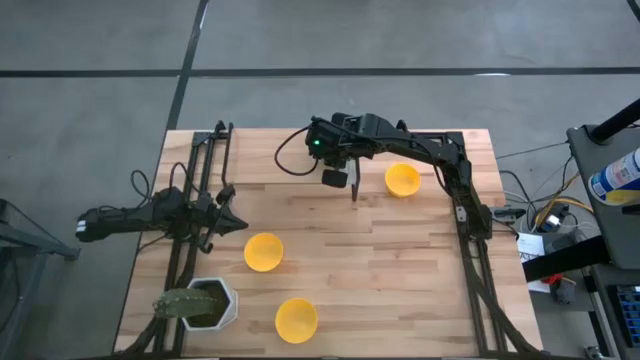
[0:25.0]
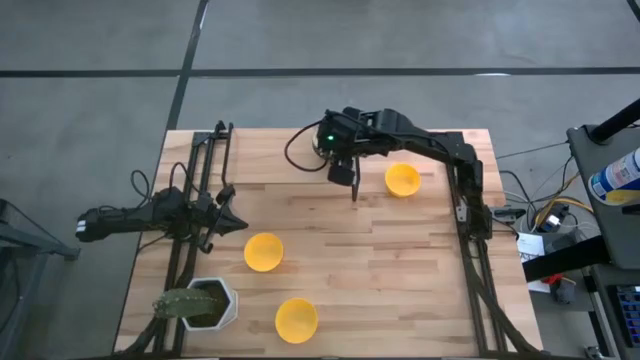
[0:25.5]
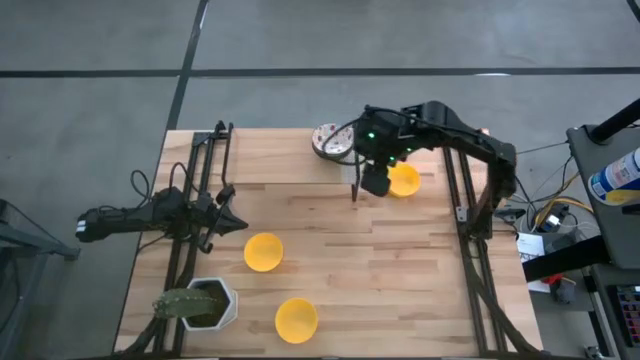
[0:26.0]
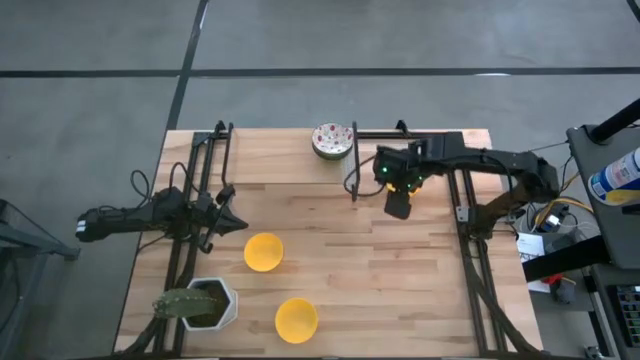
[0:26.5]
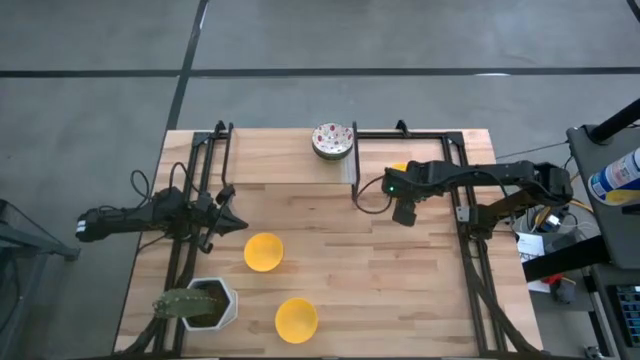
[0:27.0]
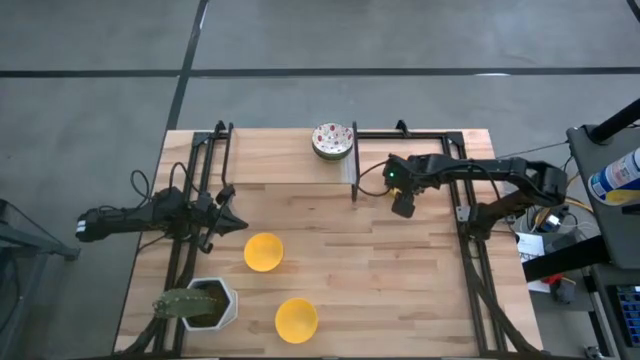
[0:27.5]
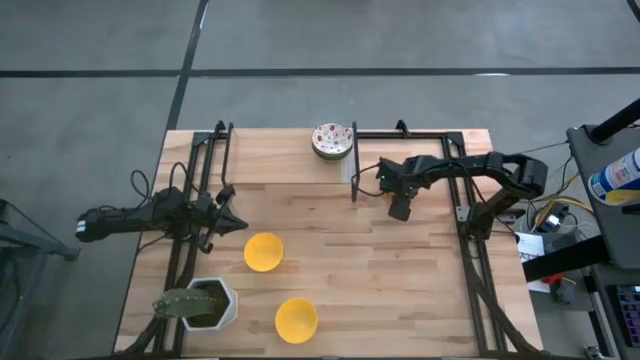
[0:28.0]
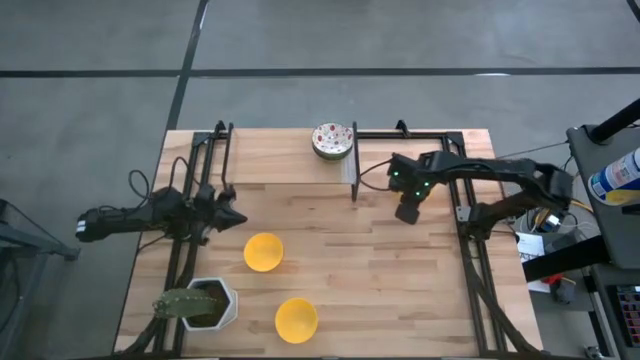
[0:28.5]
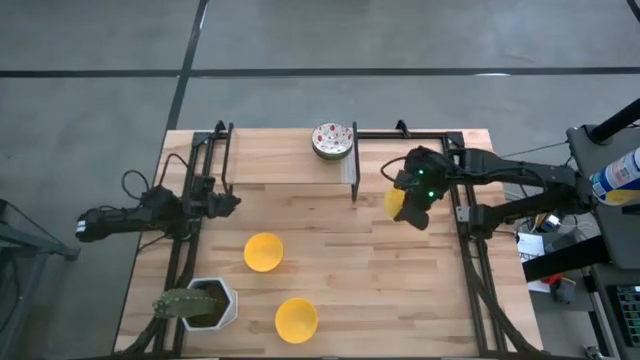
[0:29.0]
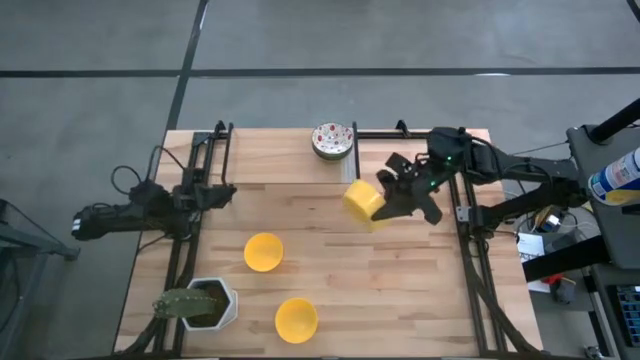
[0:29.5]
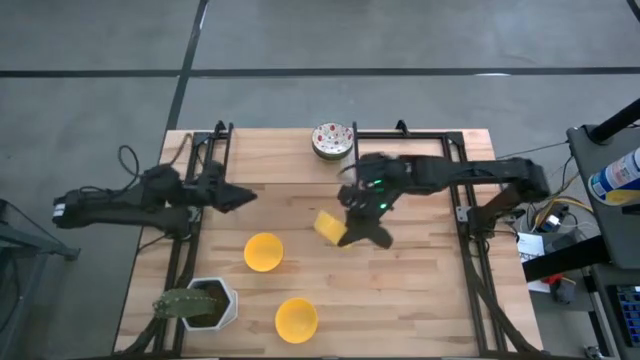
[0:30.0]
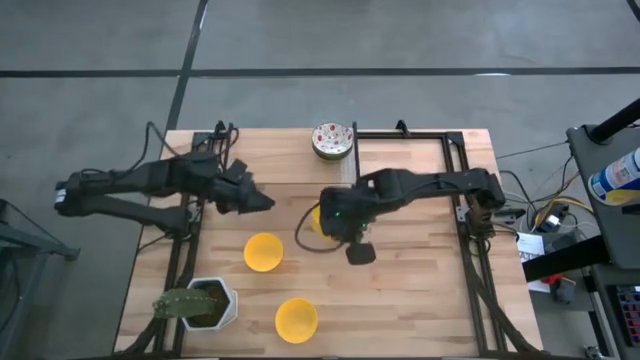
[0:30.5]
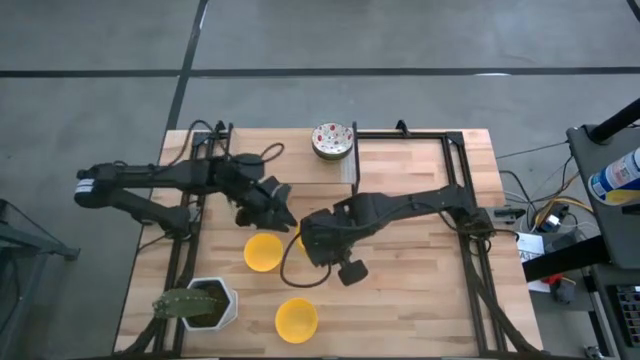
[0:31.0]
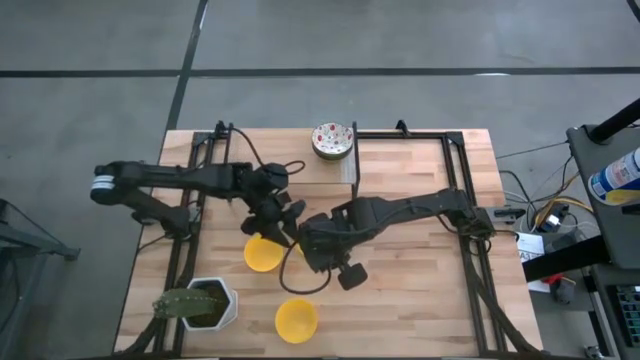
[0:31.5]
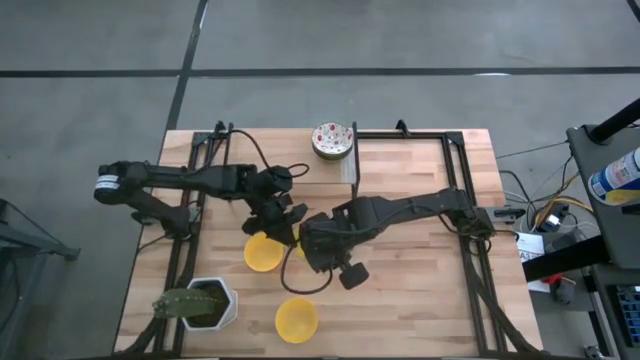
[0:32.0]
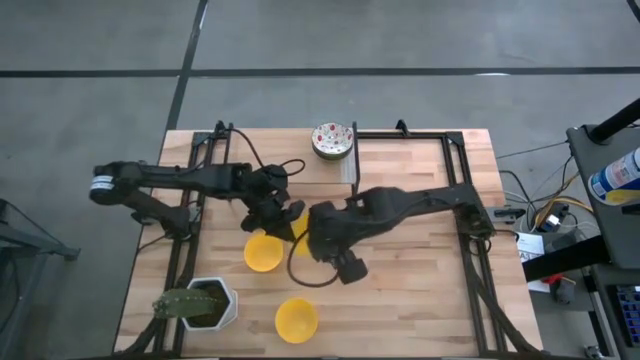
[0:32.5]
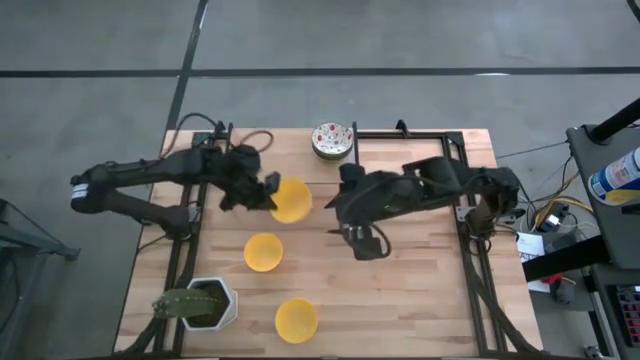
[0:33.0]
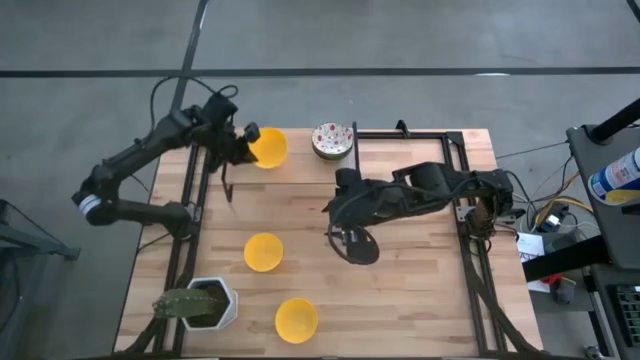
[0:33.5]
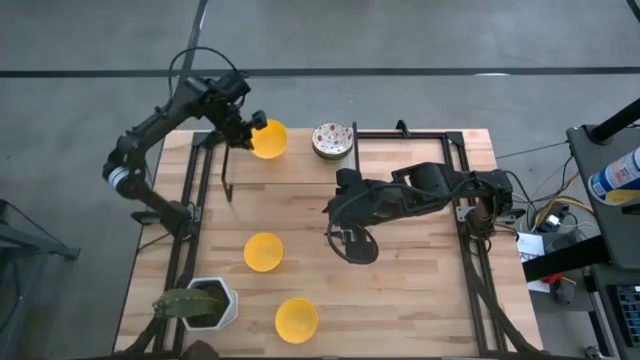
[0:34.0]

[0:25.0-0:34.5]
Task: Pick & Place Mini bowls
Put the top yellow bowl on the shelf

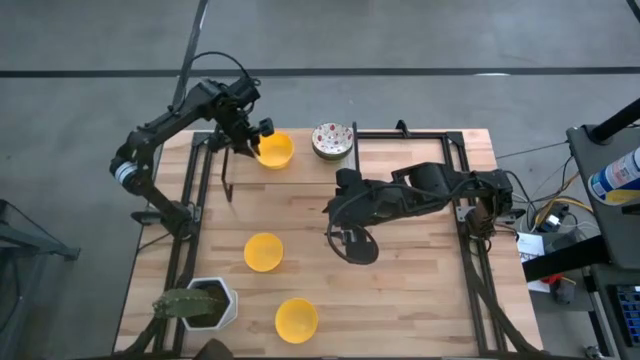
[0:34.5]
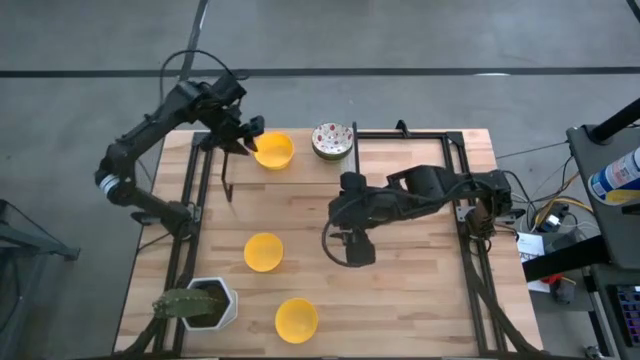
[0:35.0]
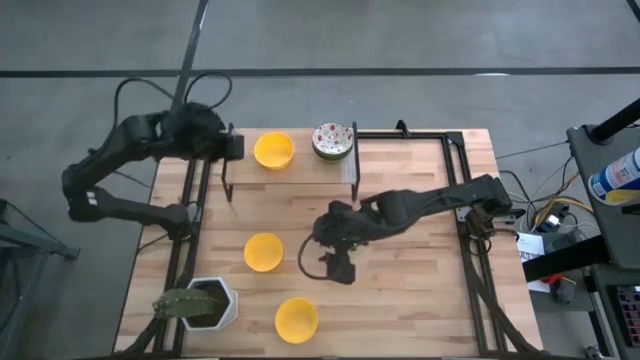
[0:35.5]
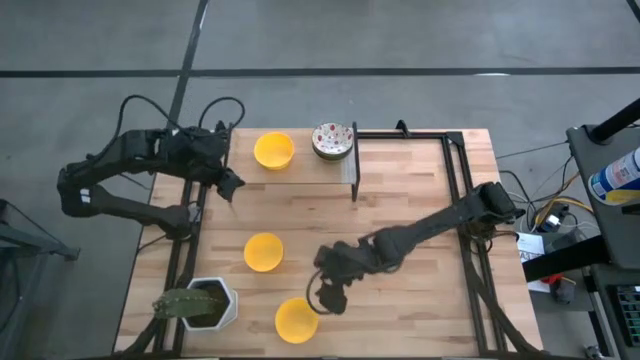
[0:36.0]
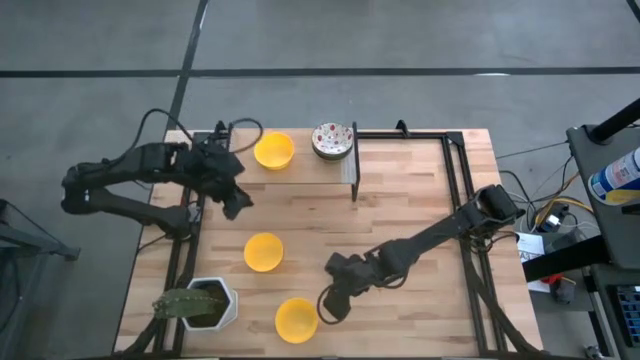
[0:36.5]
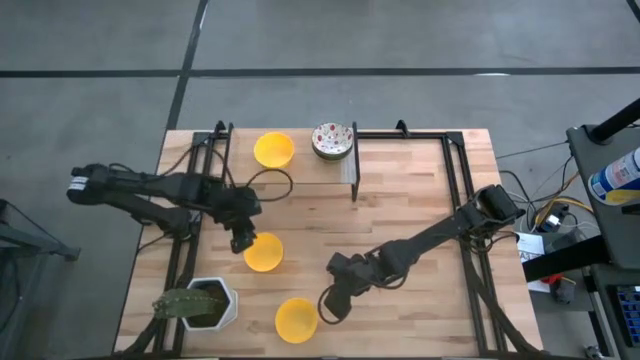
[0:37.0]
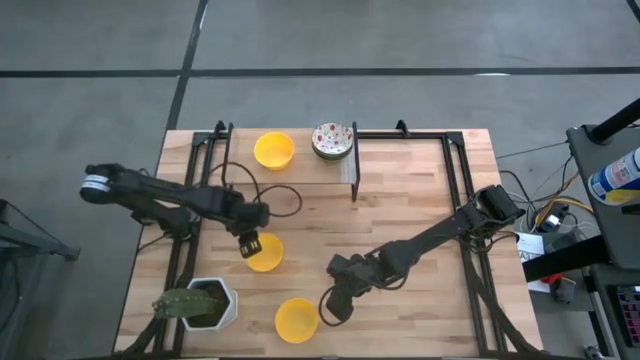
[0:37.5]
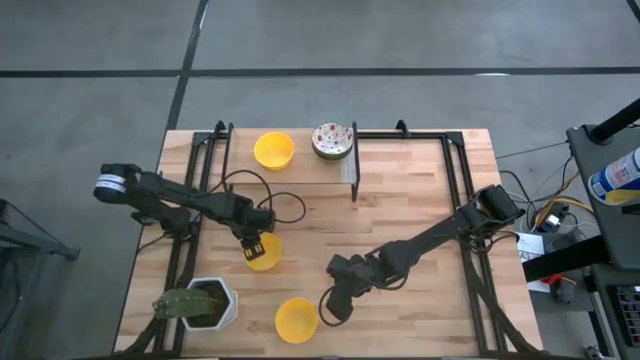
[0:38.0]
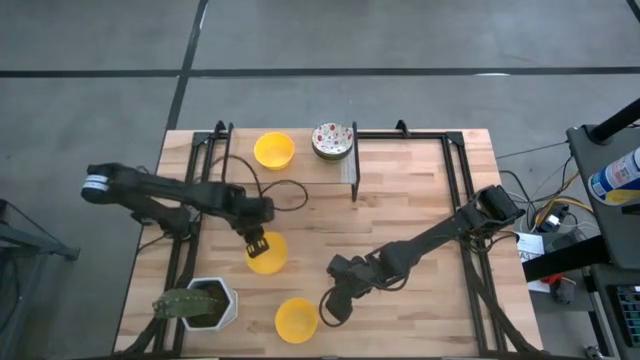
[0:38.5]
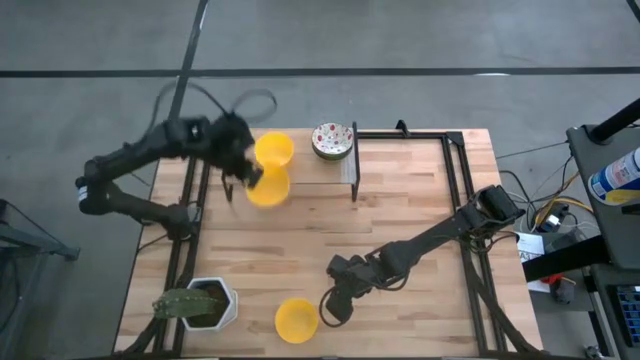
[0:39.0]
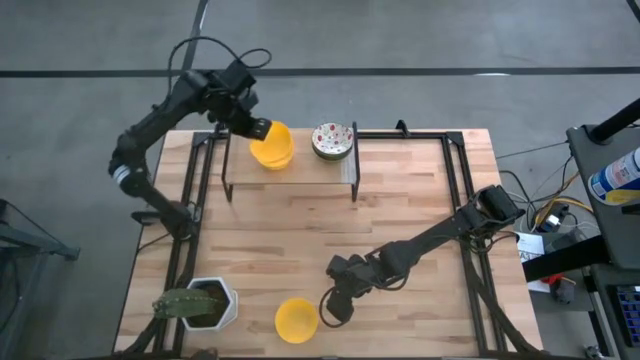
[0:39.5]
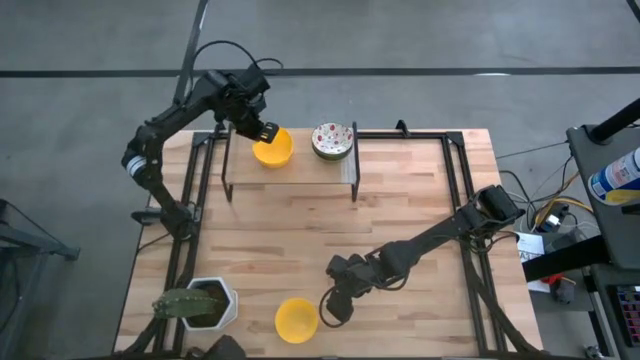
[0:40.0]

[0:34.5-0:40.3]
Stack the top yellow bowl on top of the yellow bowl on the shelf

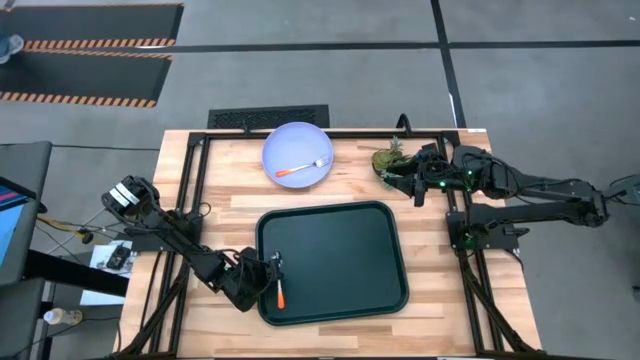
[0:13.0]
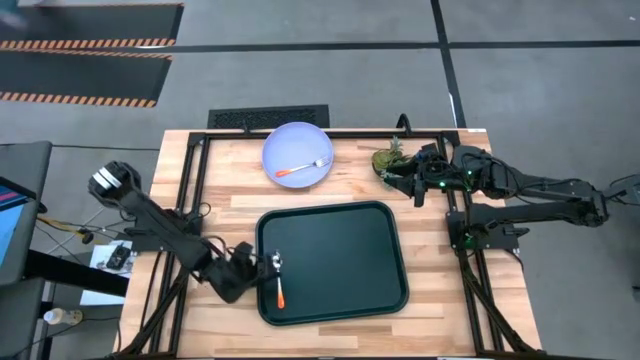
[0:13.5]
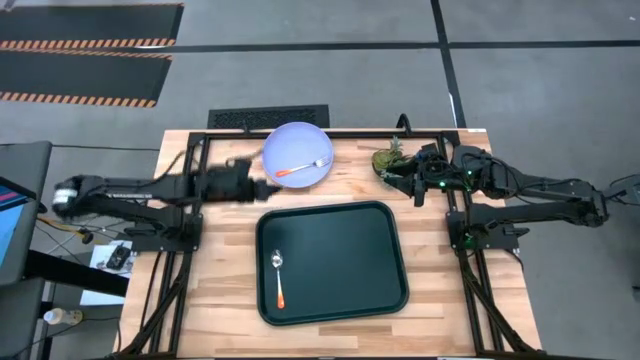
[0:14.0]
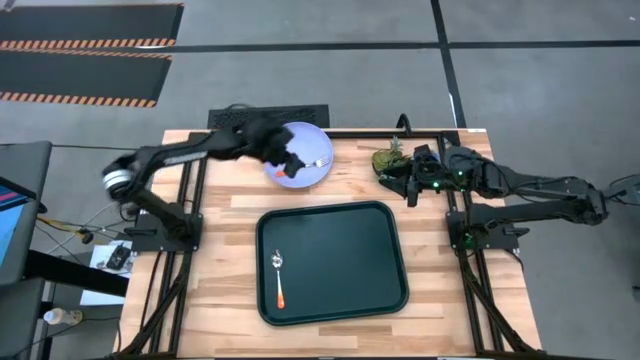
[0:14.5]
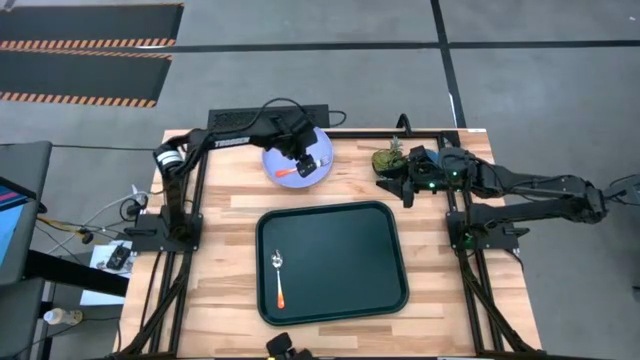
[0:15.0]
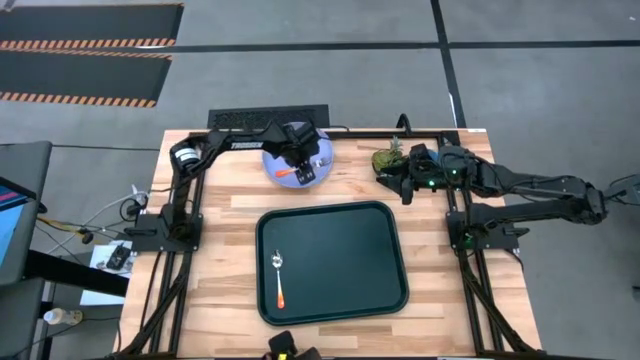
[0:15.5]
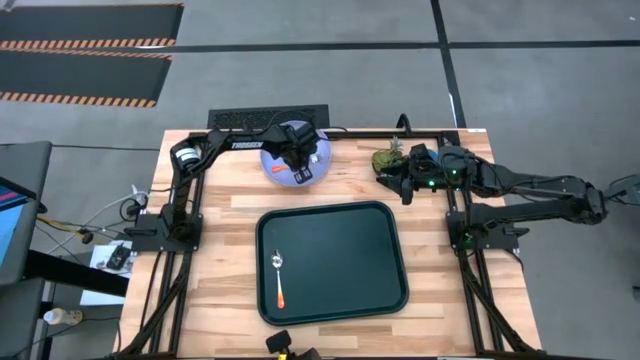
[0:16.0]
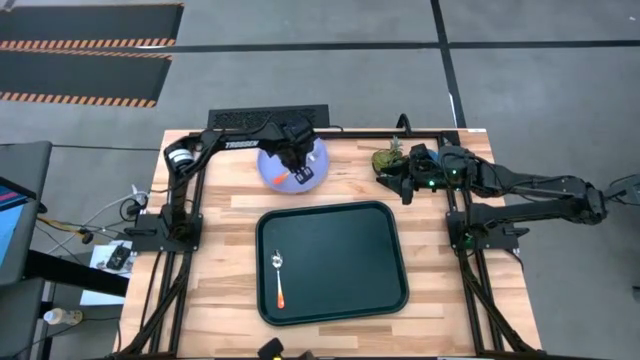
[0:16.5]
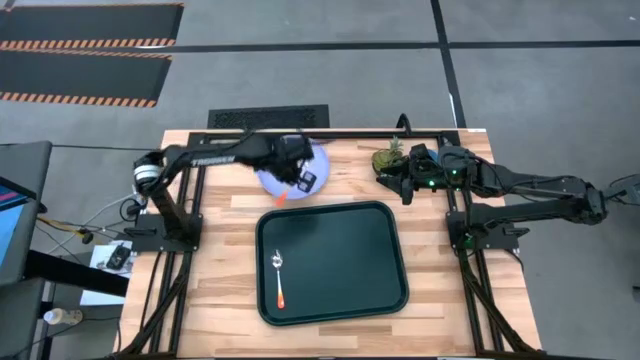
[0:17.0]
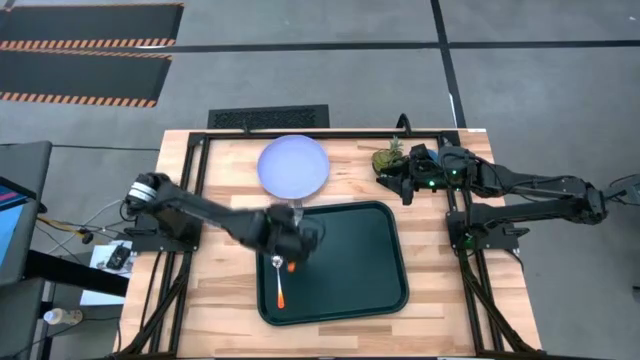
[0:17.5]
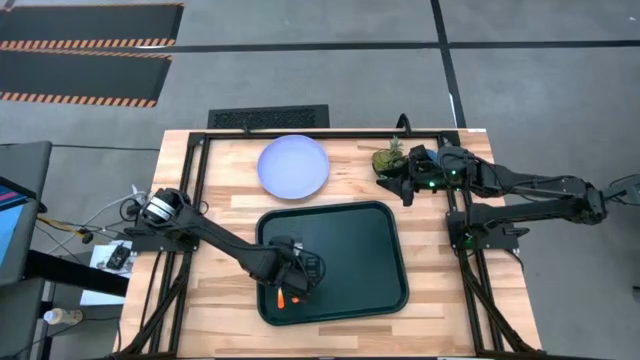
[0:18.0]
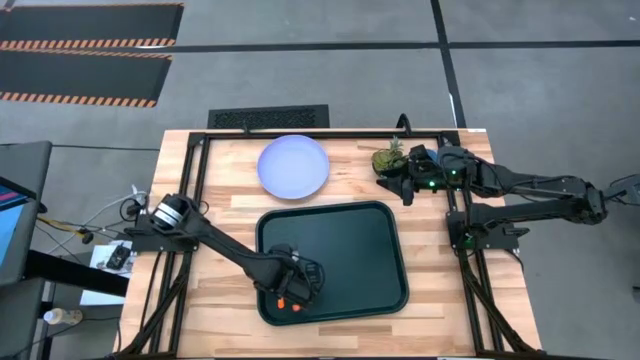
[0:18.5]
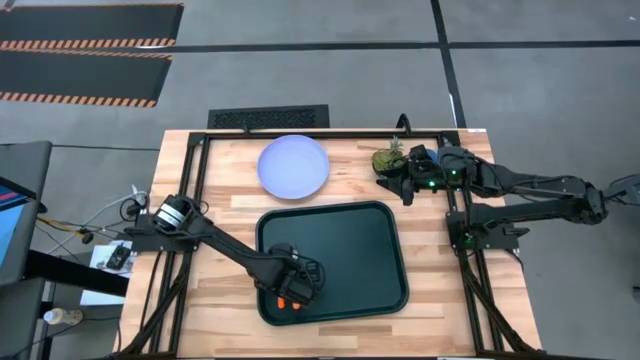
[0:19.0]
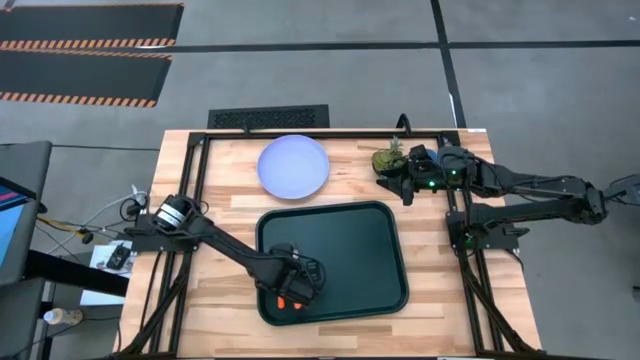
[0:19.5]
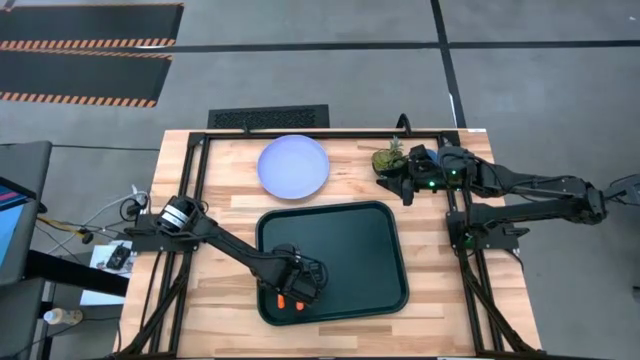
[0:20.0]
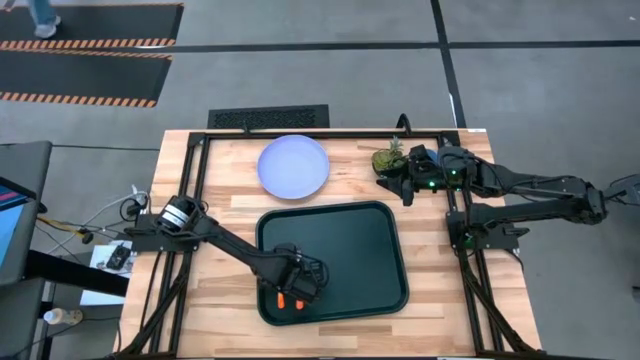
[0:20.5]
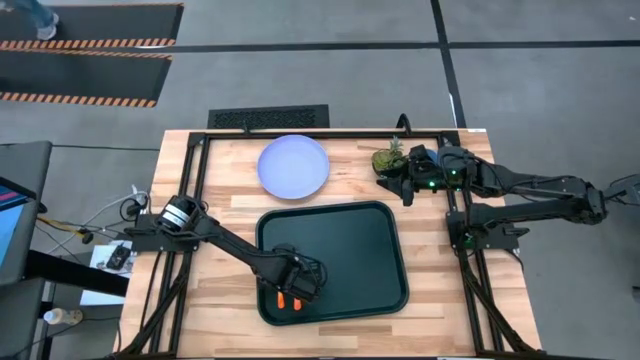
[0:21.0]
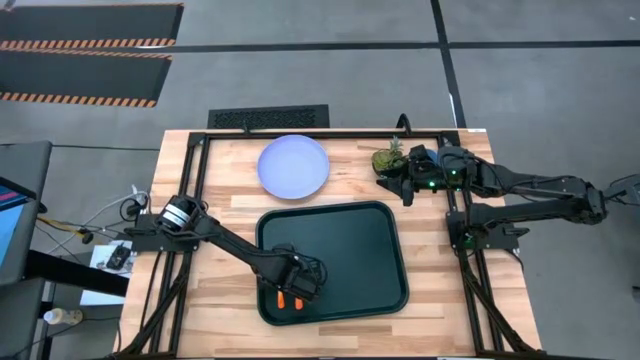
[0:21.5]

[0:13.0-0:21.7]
Task: Pick and place plate/cup/fork/spoon on tray
Put the orange fork on the black tray to the right of the orange spoon
